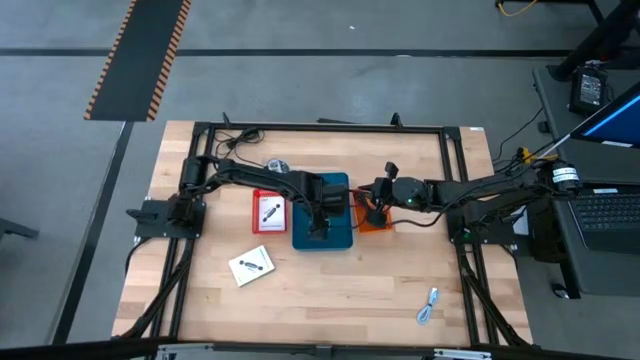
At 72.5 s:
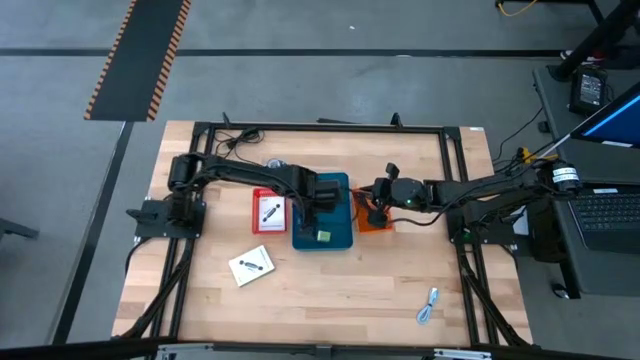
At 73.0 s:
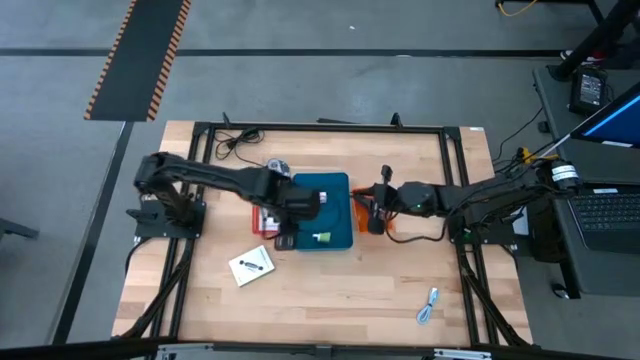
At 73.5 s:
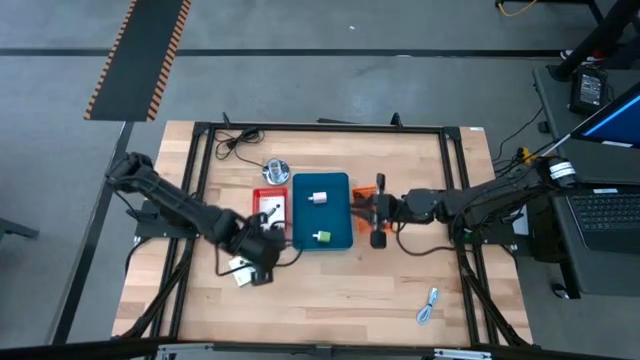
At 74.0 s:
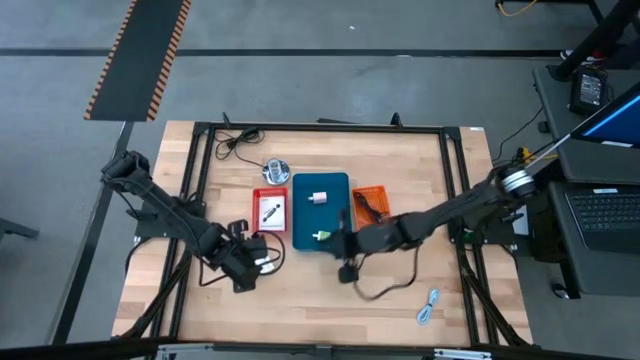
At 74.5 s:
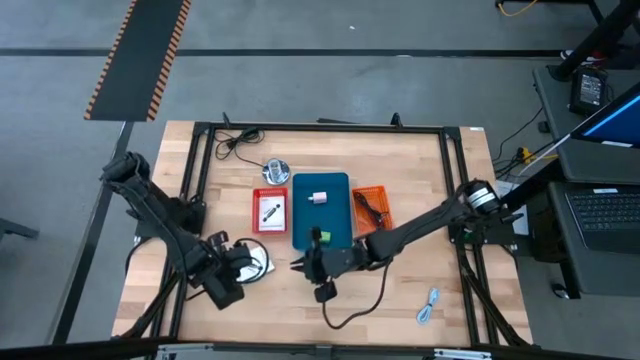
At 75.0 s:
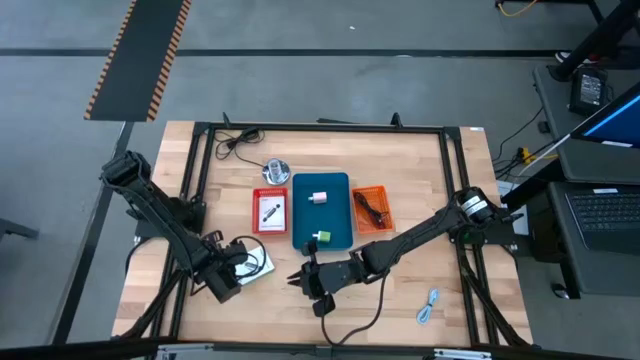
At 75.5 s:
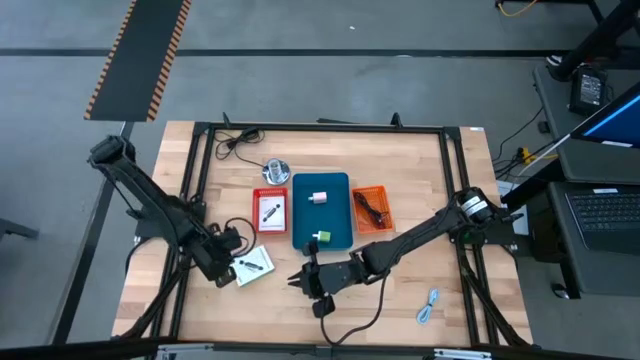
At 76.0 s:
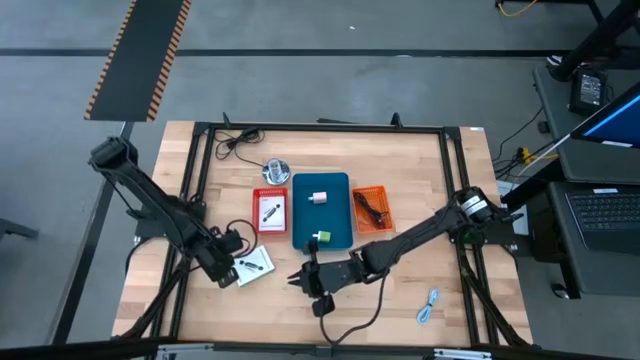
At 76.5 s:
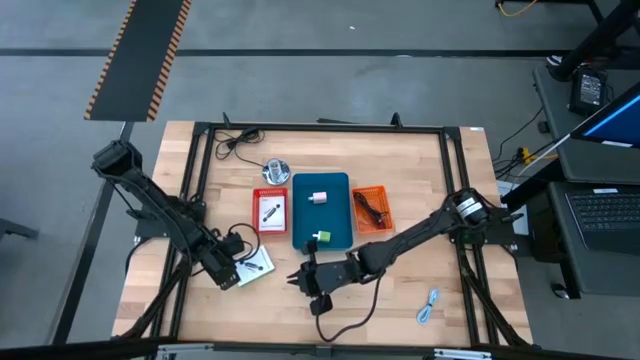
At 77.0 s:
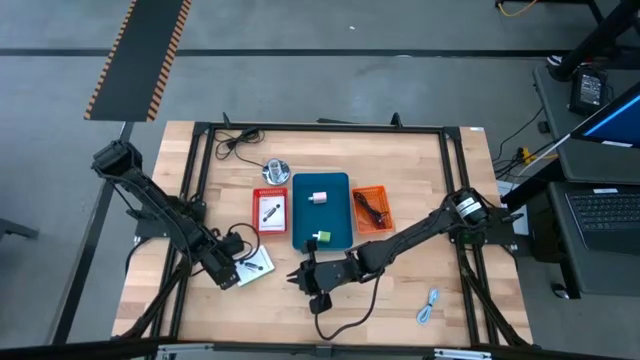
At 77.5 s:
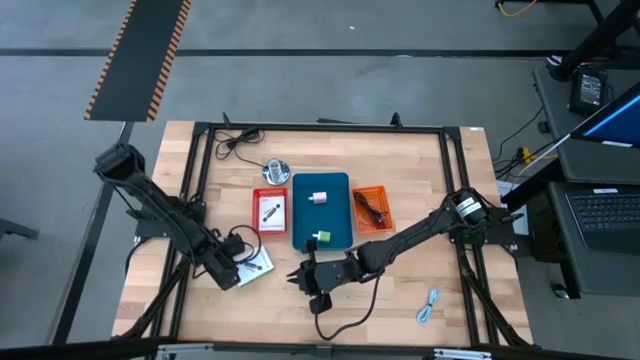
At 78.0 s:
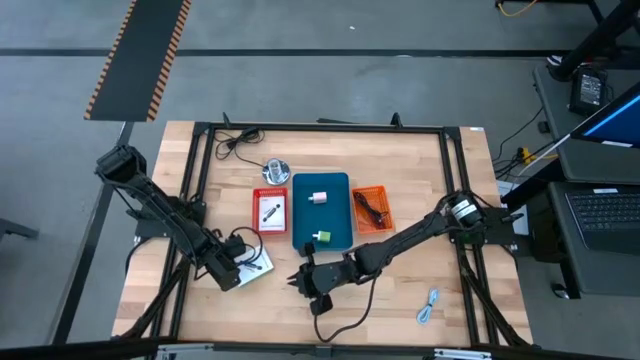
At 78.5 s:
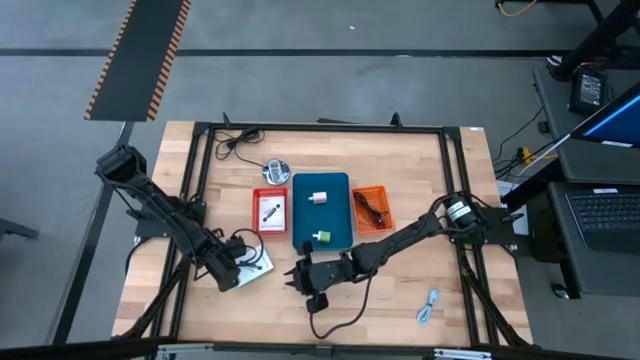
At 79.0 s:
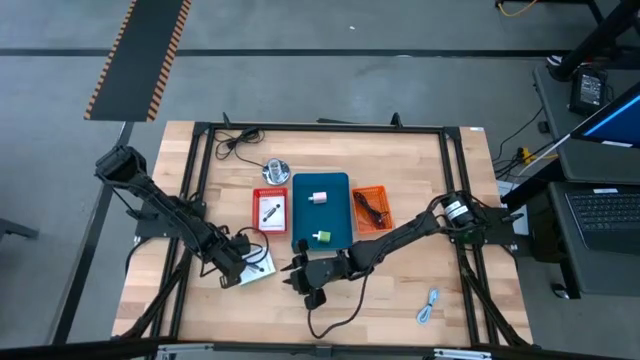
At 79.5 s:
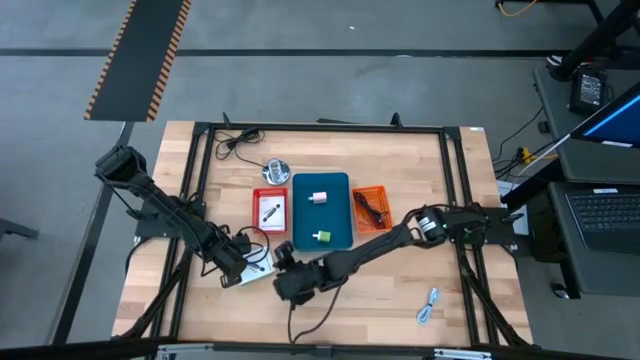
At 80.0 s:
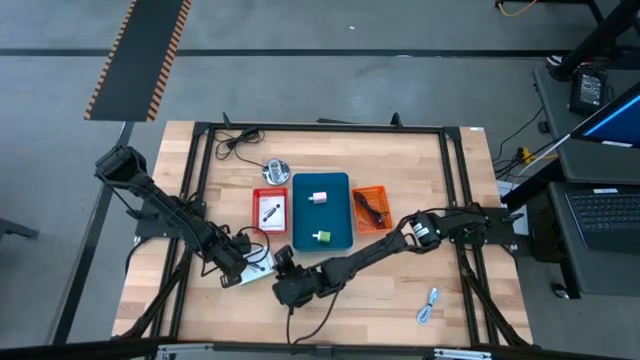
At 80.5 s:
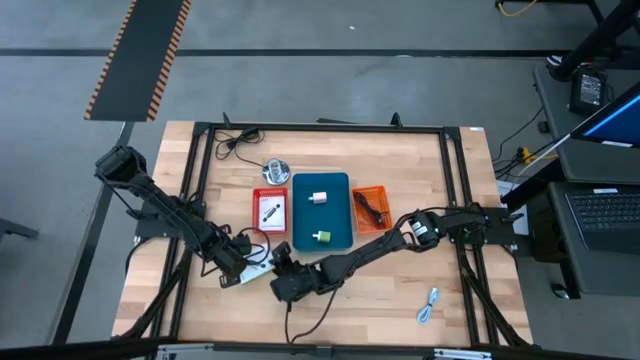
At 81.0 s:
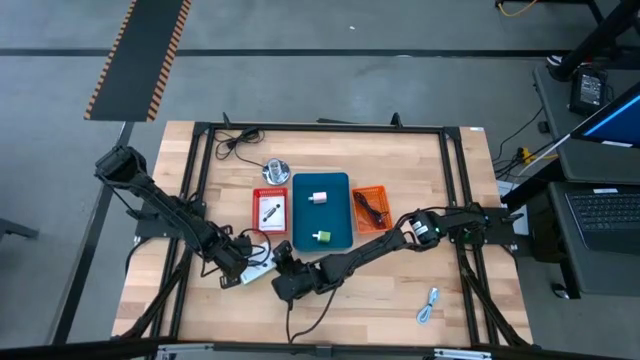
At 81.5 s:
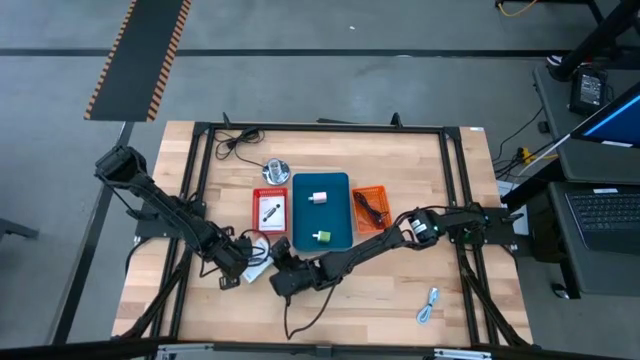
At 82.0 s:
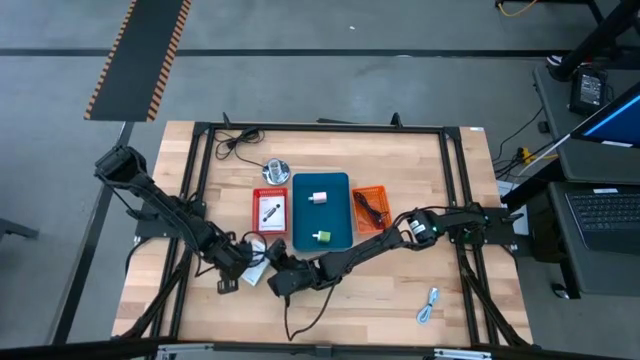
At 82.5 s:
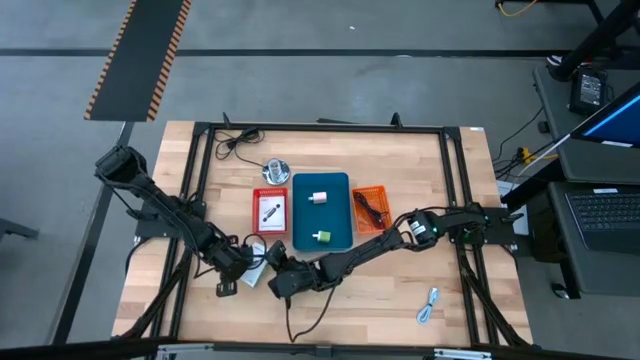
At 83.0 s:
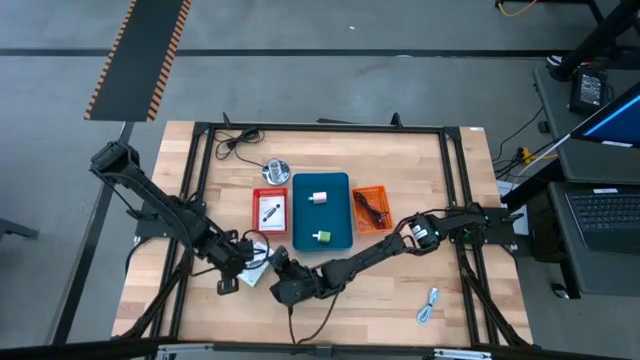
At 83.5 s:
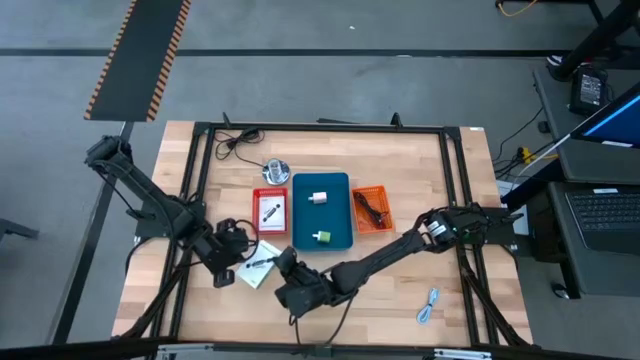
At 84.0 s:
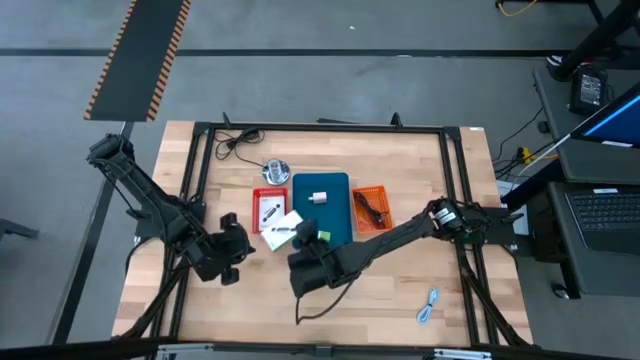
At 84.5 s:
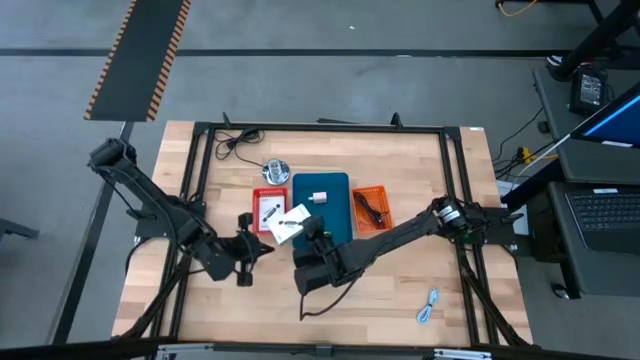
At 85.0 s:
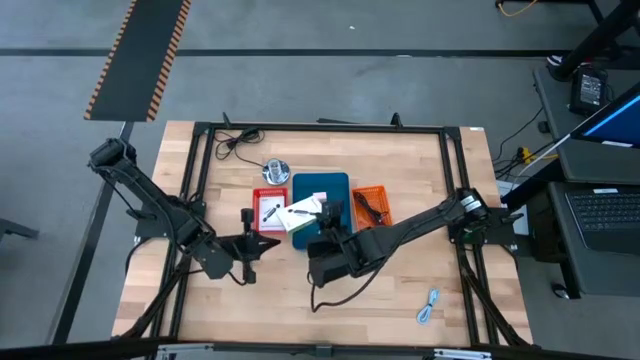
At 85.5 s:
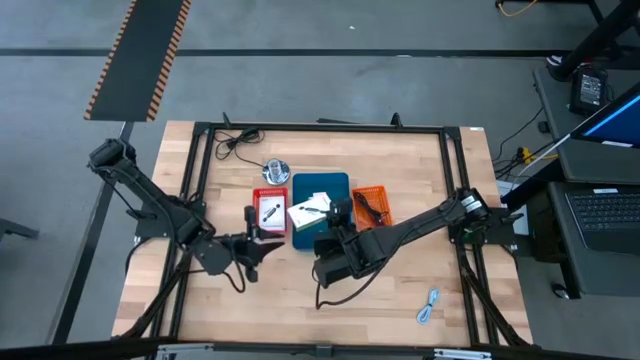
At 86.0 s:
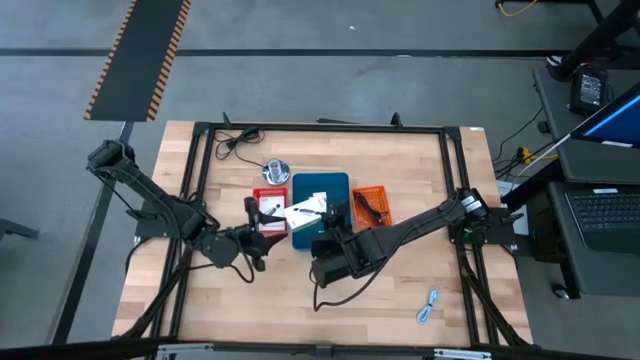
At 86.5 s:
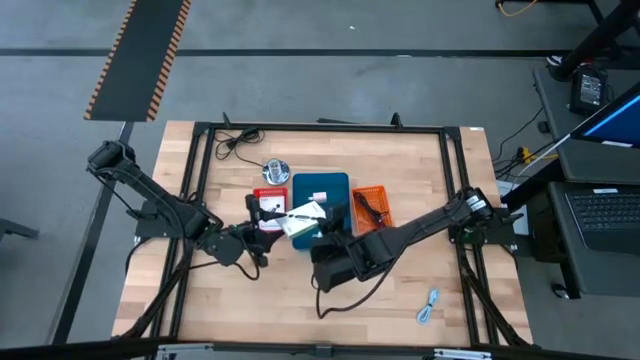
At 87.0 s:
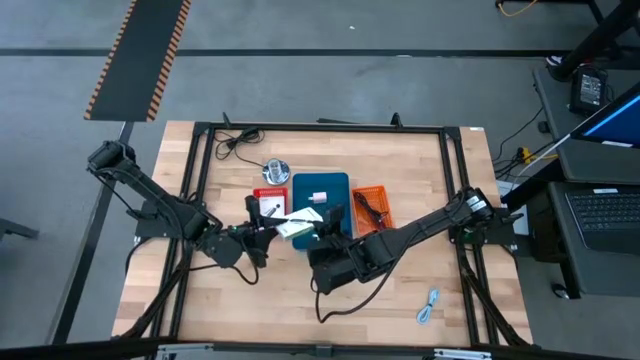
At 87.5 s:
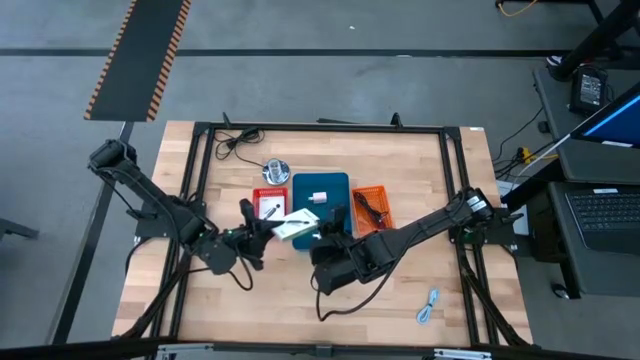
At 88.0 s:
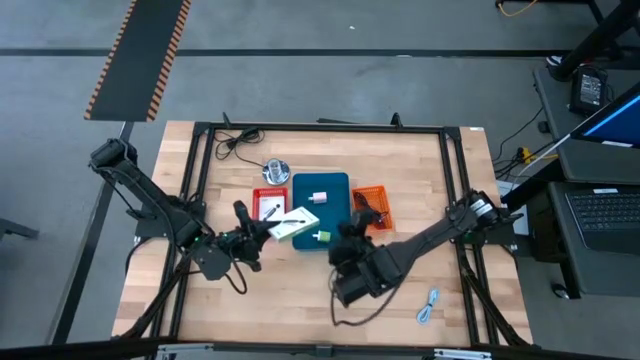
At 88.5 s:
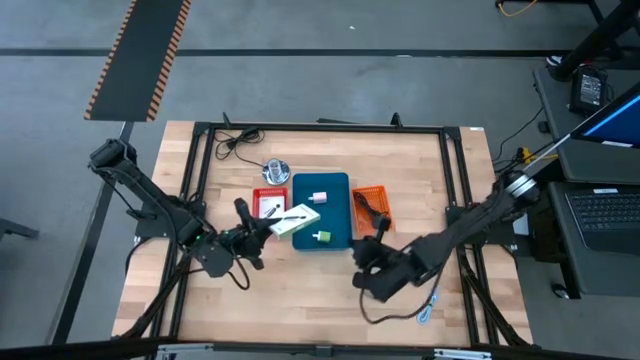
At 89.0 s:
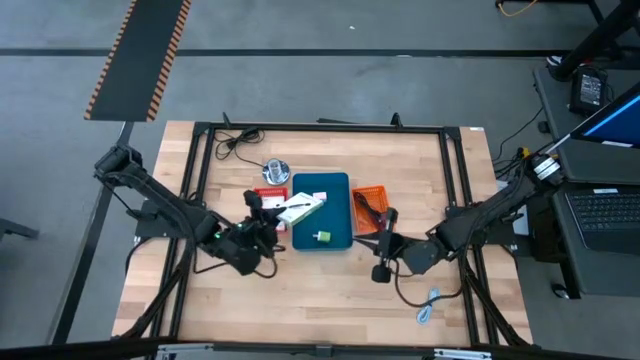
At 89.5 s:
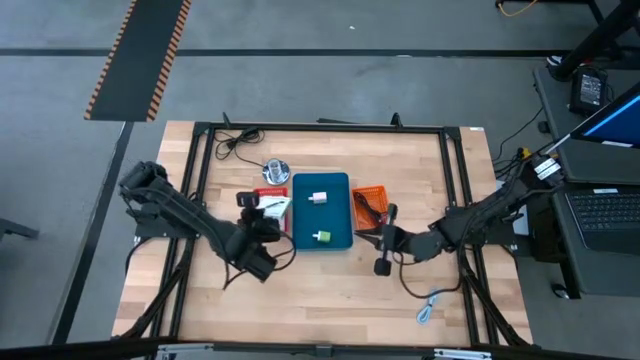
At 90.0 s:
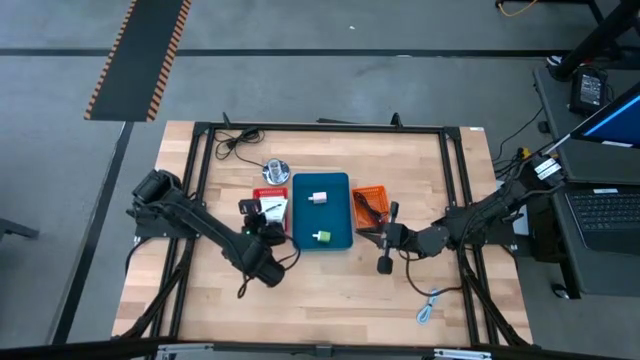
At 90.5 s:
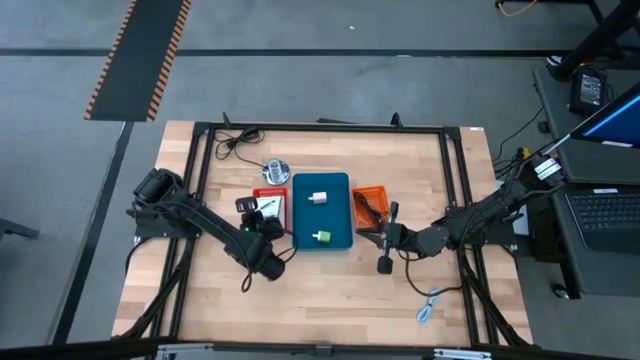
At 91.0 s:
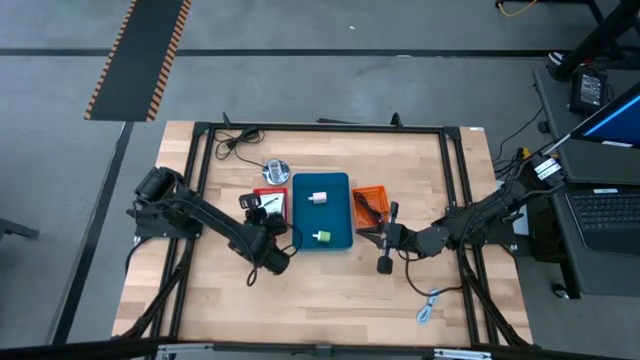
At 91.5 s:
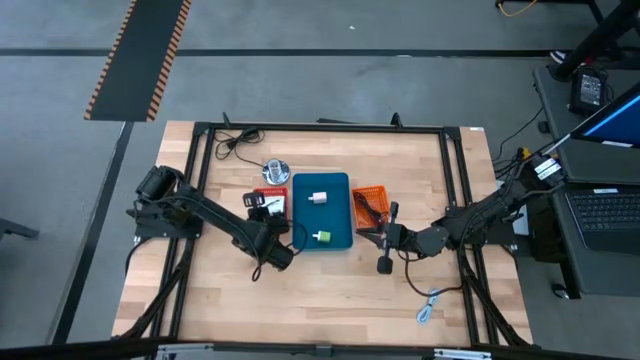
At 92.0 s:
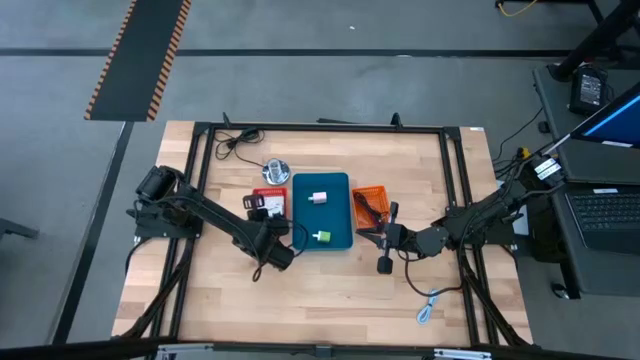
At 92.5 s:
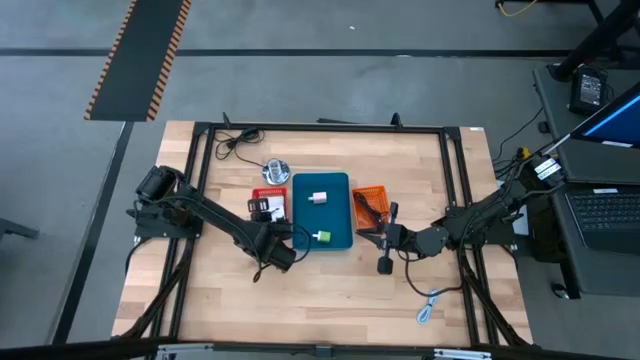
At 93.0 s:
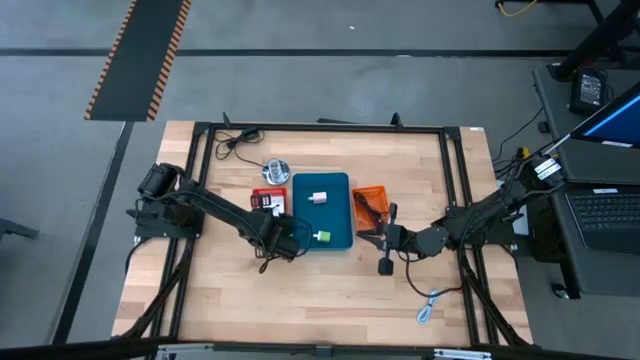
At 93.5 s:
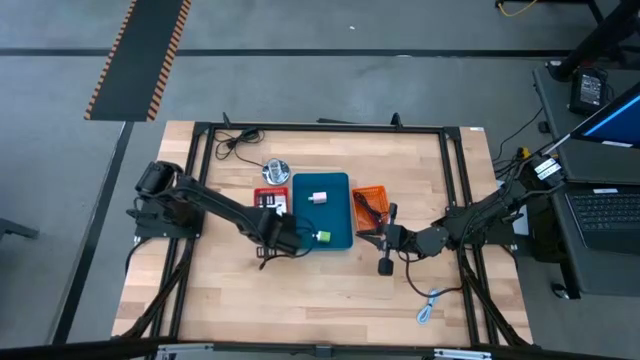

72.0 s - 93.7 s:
Task: Pick and place items into bin
Put the card reader box into the red bin

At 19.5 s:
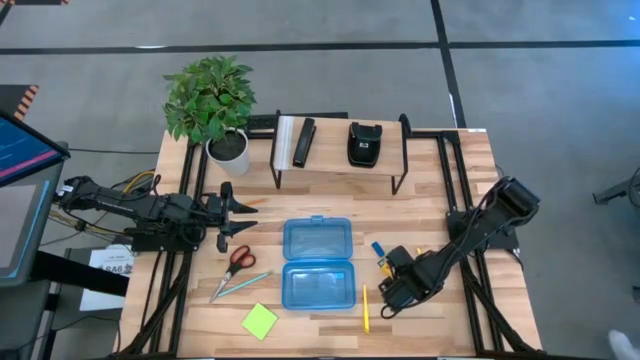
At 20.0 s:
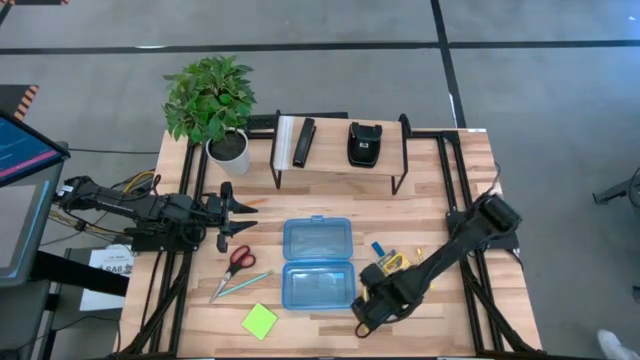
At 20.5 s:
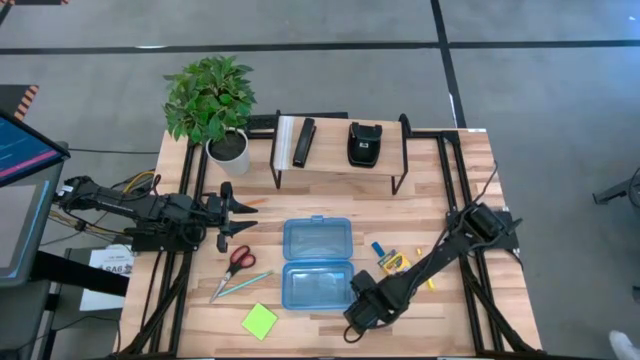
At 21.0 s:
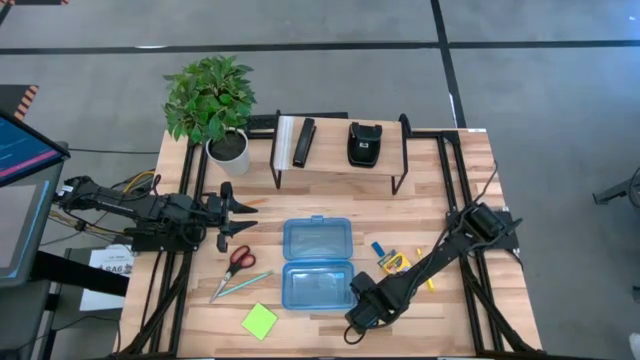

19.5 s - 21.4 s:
Task: Pack school essentials
Put the bottom yellow highlighter pen into the blue supply box
